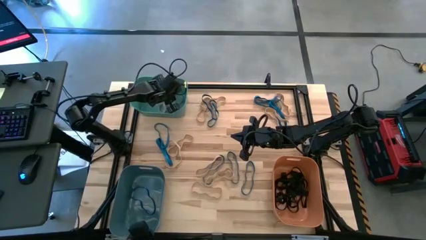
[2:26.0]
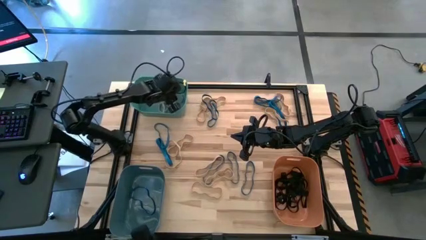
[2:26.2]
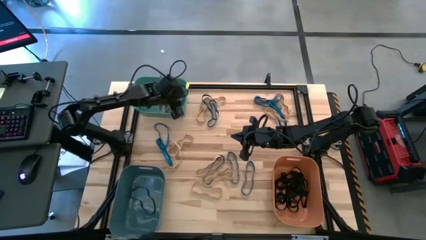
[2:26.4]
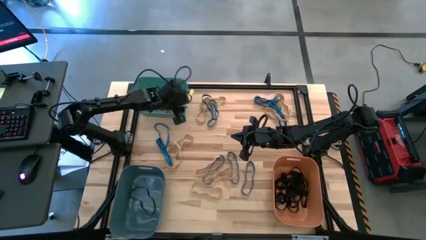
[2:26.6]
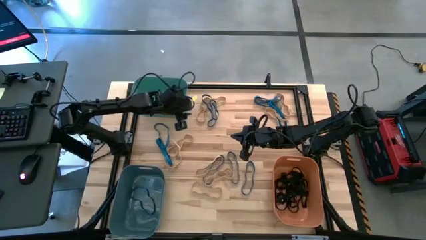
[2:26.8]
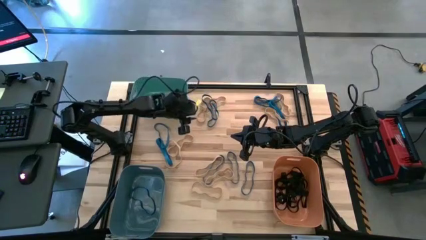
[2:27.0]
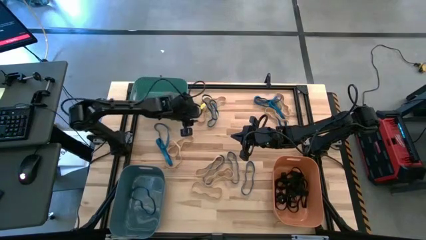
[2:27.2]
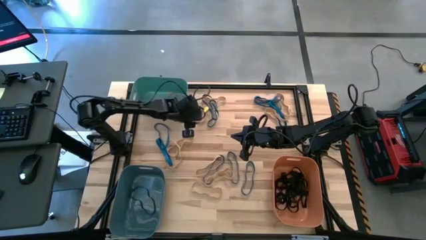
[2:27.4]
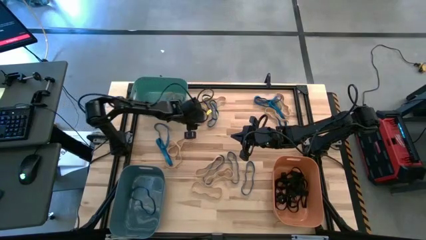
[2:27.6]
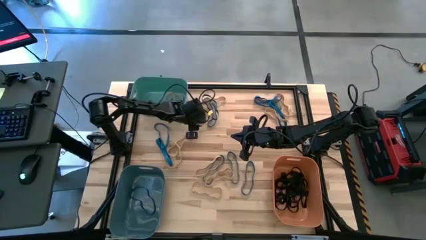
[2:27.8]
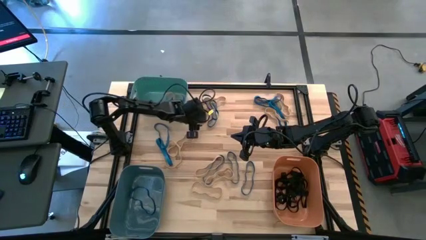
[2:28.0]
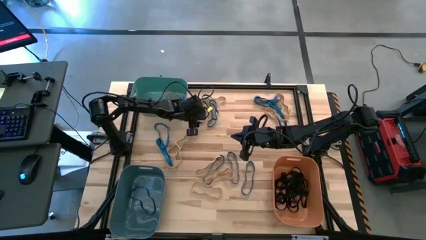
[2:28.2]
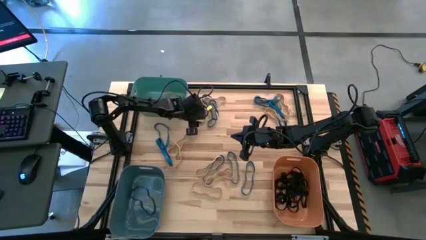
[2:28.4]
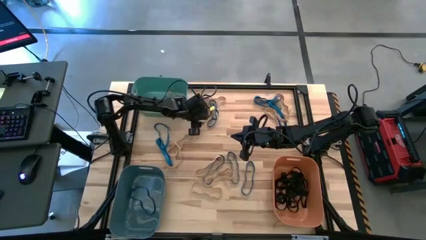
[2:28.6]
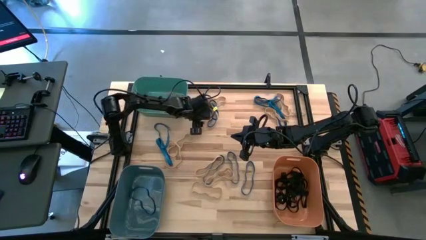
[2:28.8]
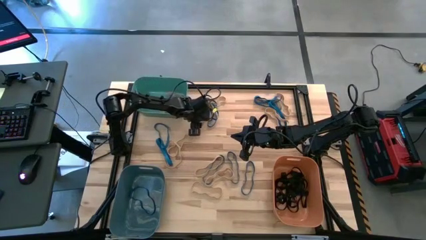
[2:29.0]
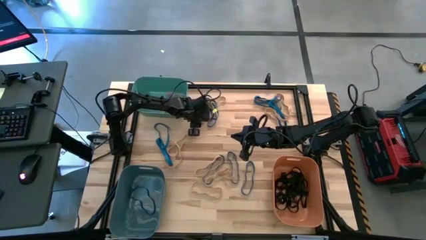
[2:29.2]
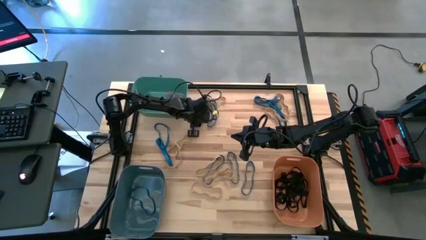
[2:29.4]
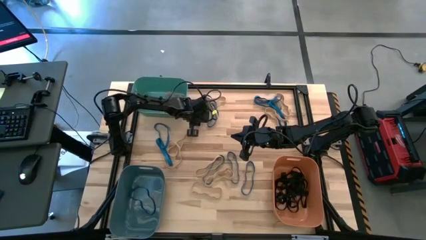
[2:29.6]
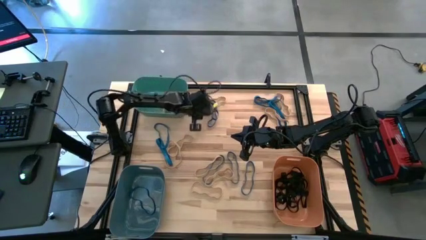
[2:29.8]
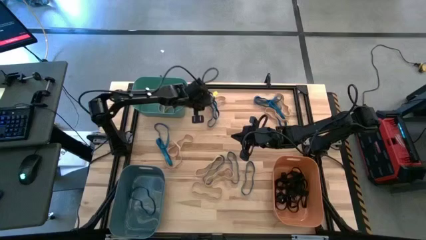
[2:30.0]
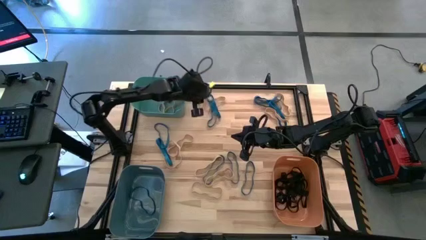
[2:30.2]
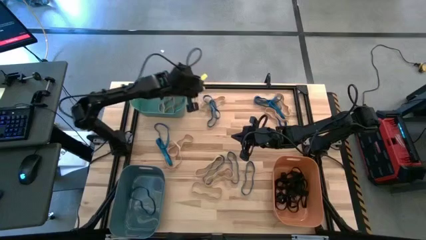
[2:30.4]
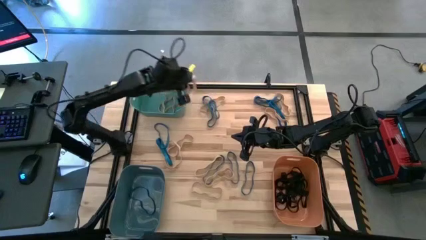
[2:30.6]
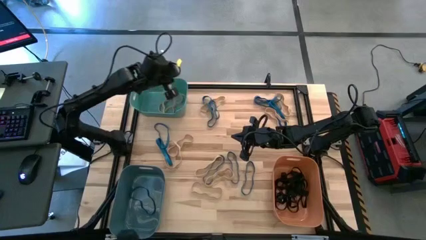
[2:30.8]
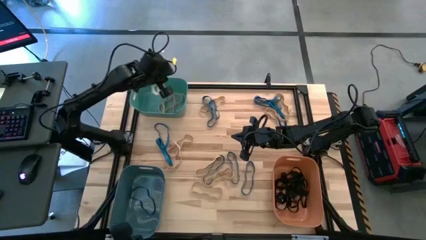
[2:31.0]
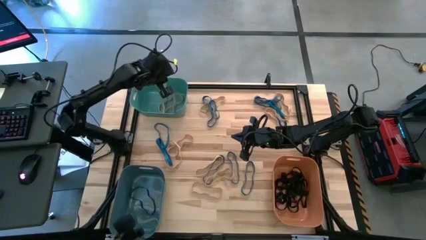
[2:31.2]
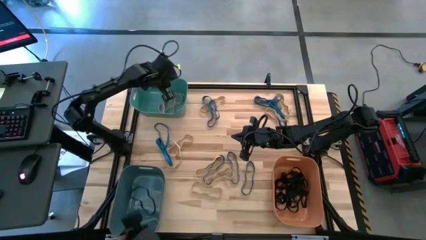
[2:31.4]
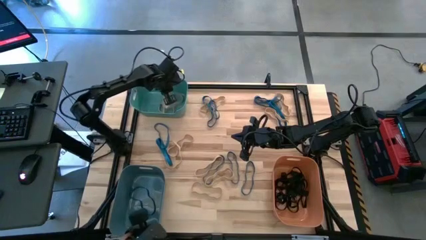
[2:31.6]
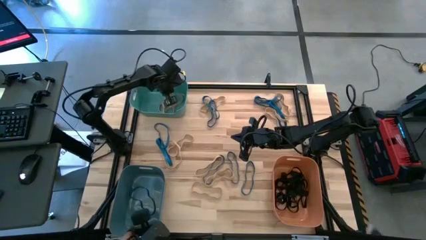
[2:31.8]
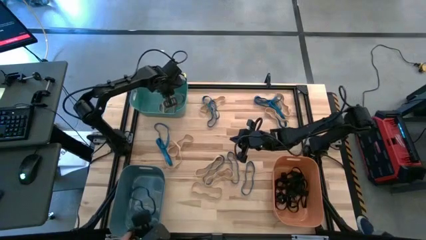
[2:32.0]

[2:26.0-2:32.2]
Task: Sort rubber bands into baskets
Put the brown rubber band into the green bin

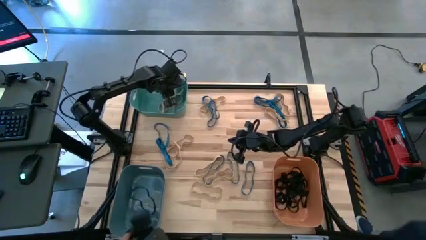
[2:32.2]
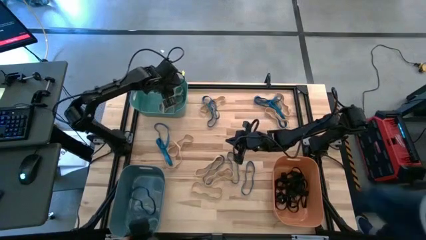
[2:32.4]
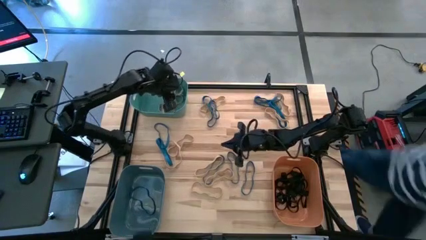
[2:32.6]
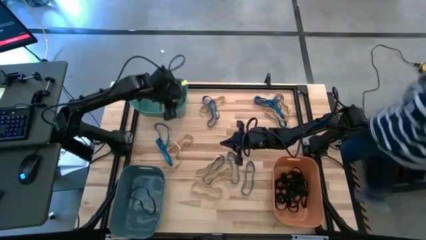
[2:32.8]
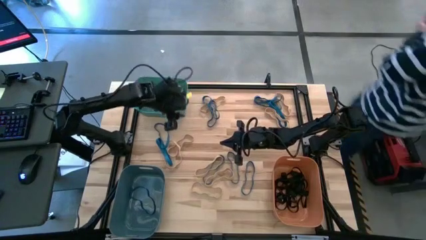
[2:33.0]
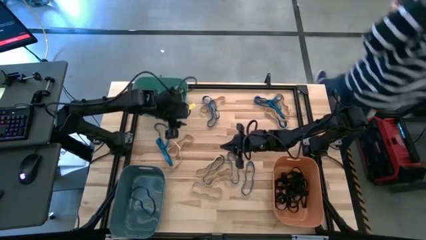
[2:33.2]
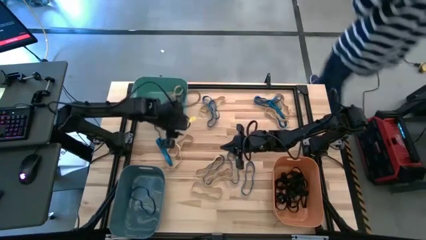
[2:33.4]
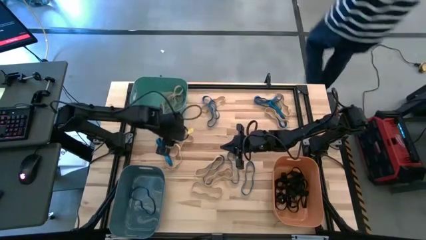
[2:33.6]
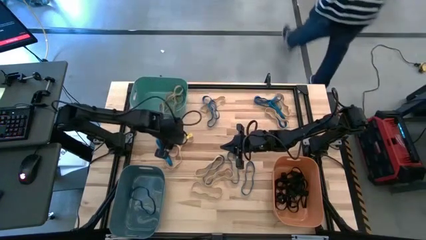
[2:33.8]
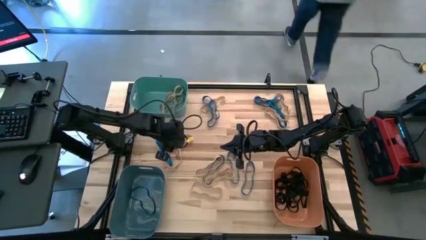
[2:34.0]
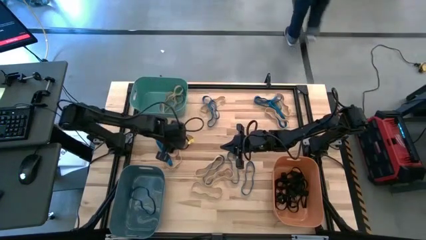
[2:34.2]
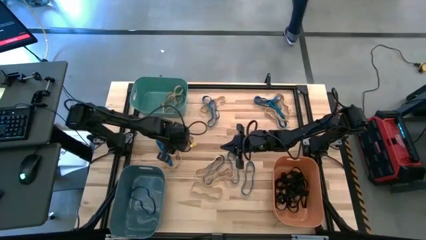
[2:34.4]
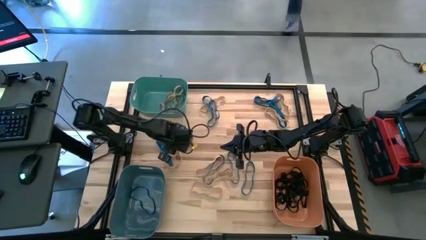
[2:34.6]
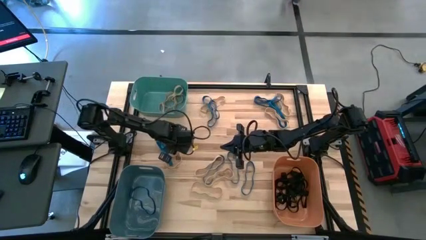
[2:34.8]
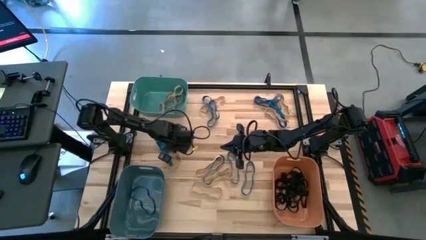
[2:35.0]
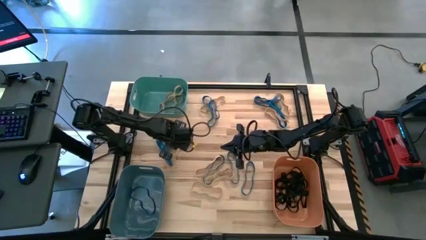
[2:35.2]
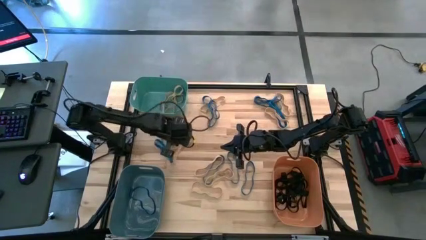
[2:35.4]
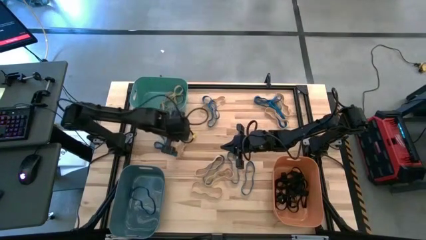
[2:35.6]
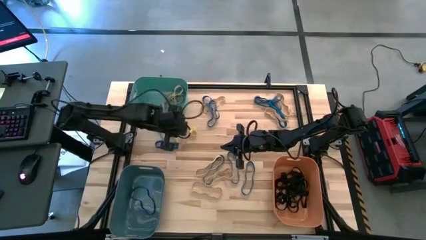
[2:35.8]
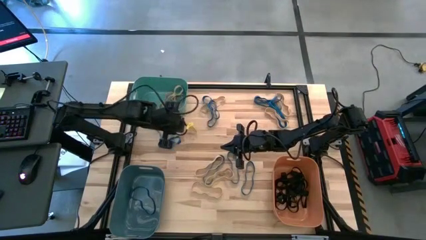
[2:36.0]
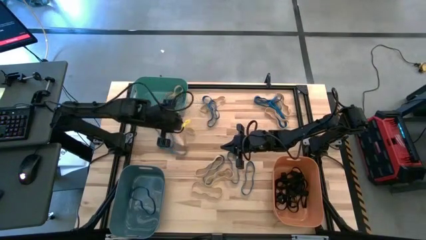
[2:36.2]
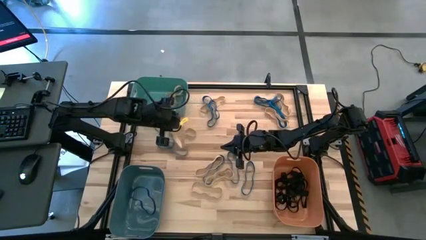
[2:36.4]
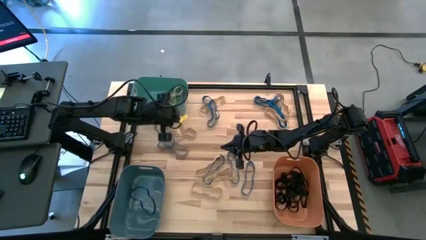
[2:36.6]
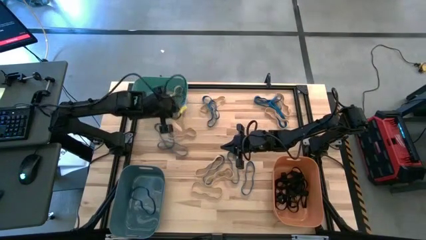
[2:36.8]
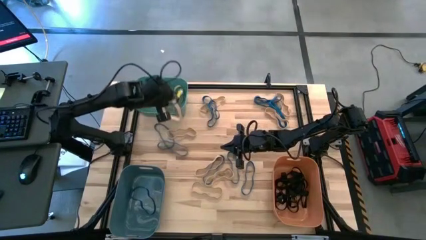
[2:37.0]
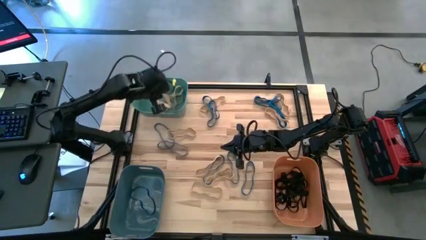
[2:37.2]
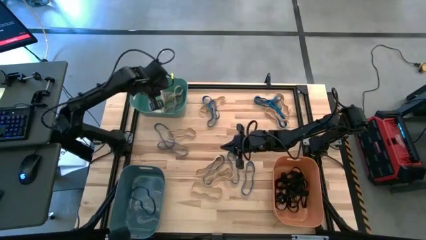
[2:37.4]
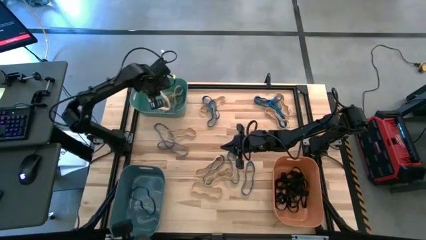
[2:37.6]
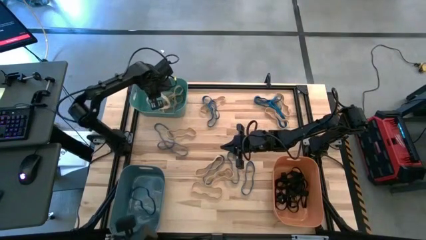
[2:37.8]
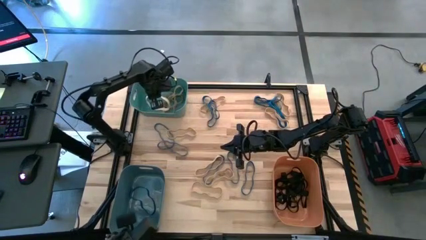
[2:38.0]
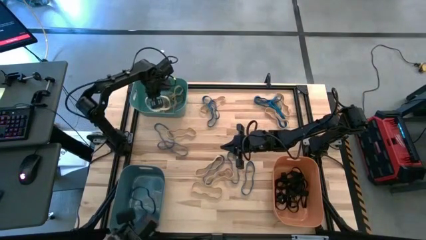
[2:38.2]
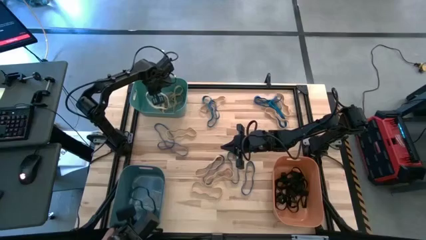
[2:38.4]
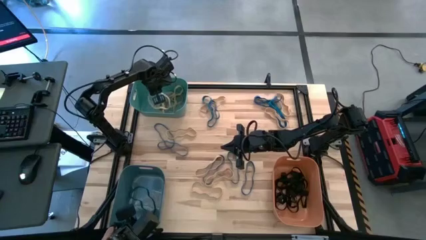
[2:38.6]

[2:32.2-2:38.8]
Put the brown rubber band into the green bin

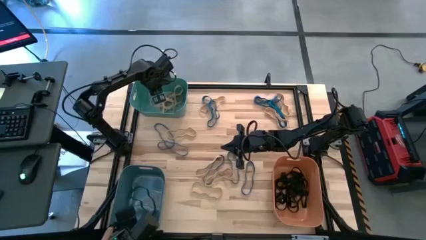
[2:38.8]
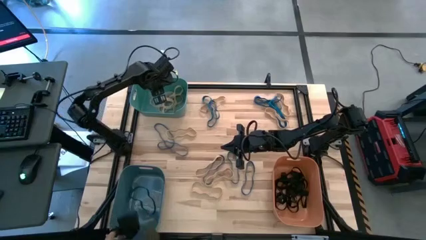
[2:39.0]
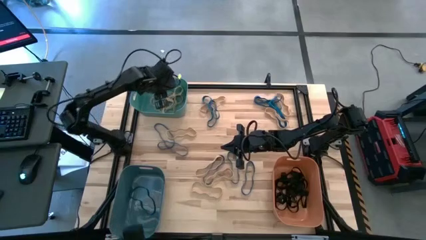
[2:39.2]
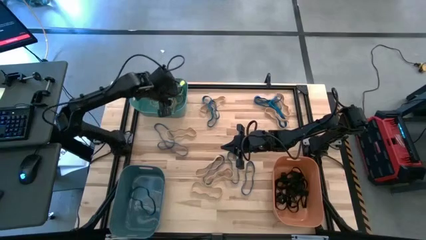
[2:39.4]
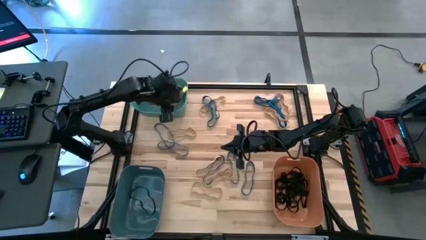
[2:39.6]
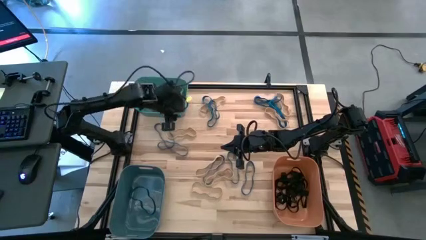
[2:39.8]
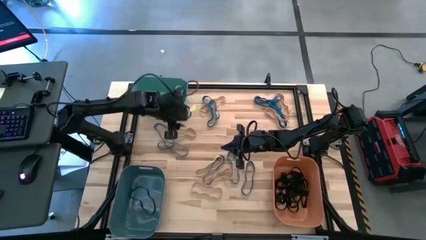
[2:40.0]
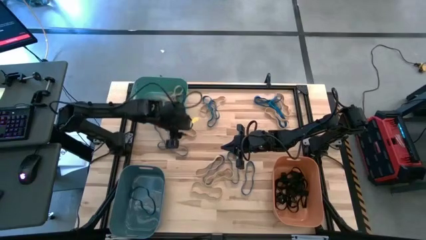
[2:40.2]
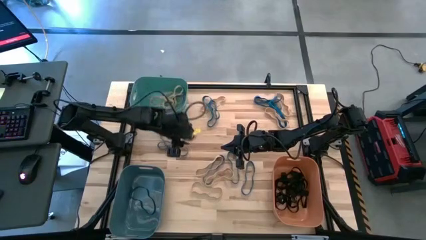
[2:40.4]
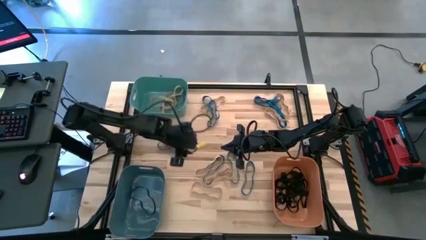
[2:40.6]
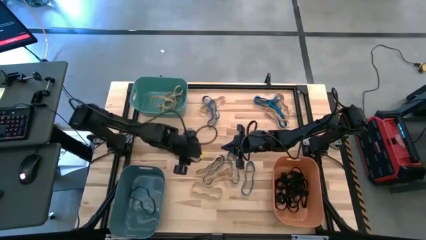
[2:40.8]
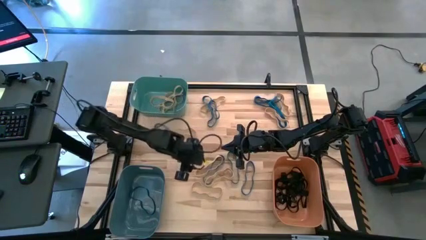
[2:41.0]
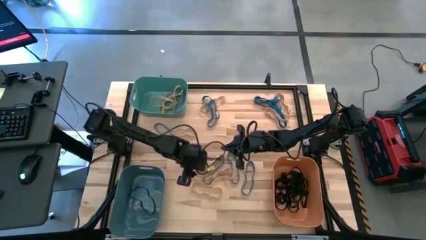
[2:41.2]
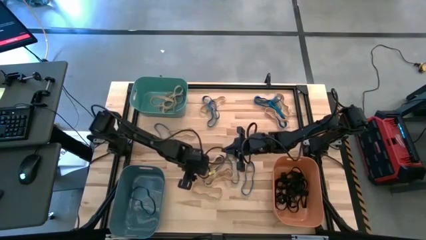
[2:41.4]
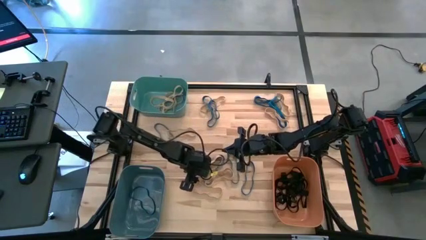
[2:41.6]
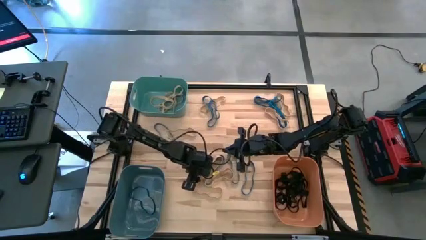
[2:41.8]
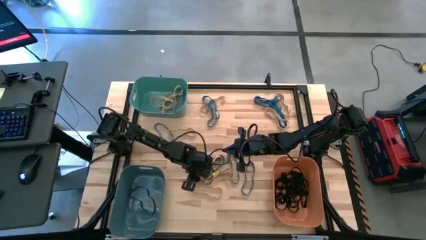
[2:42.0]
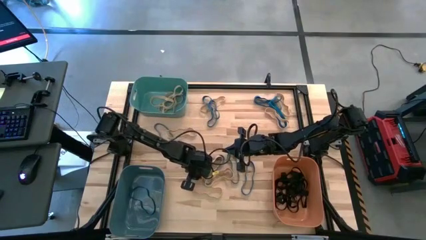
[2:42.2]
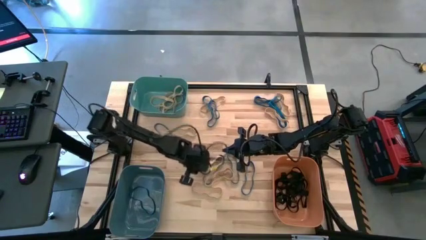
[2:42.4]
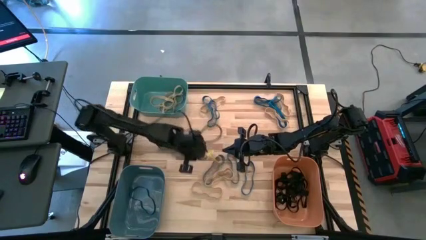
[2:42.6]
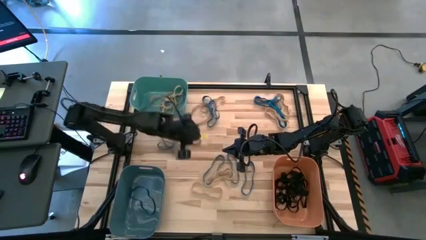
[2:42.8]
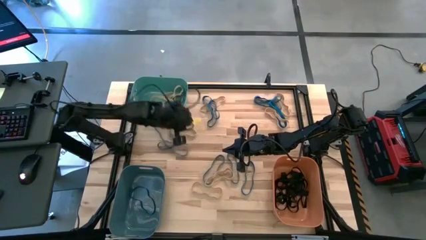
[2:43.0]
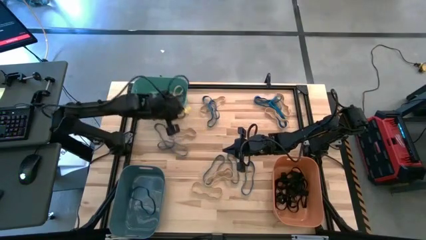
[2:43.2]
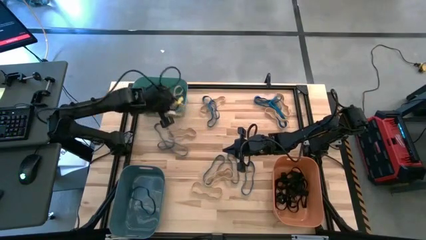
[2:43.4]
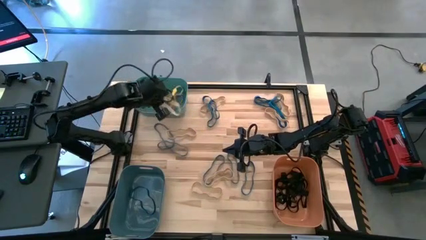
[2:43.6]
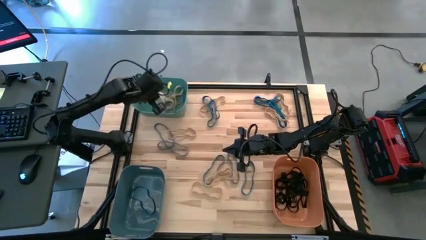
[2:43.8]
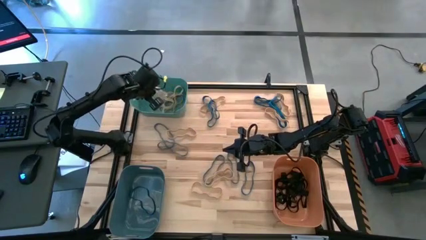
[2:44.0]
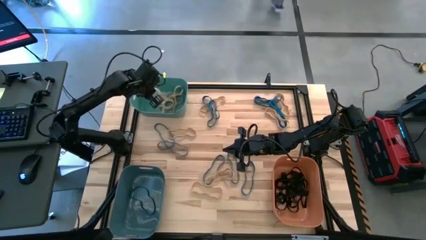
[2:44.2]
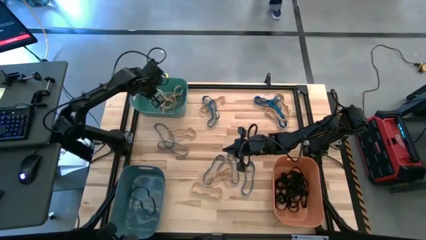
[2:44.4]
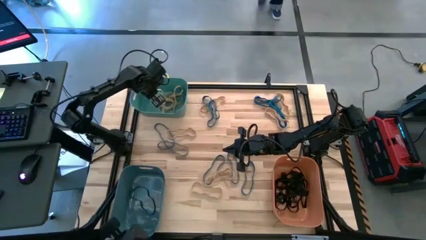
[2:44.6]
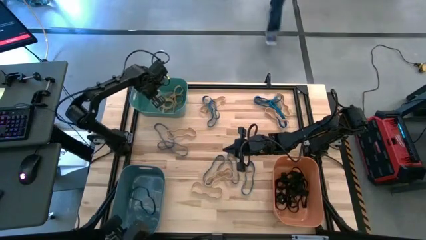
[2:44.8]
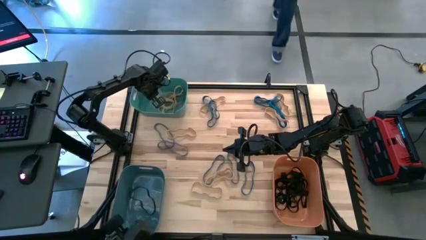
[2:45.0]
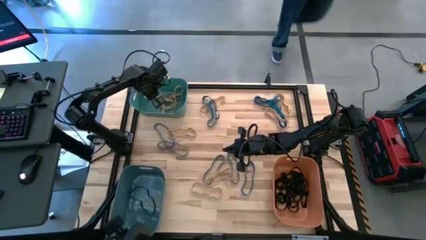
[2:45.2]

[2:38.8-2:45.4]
Put the brown rubber band into the green bin
